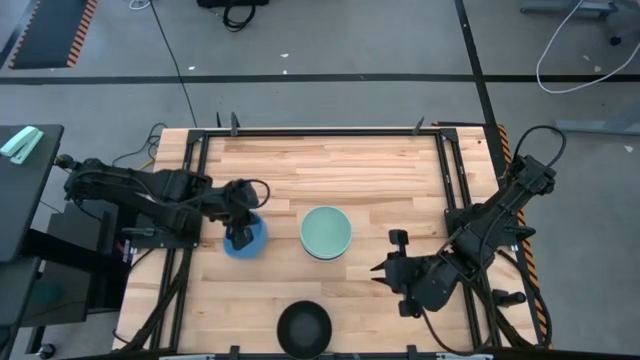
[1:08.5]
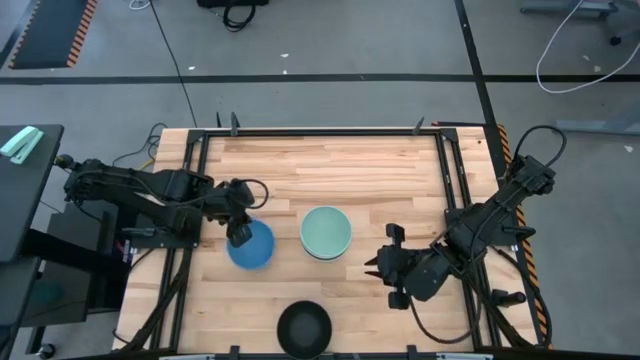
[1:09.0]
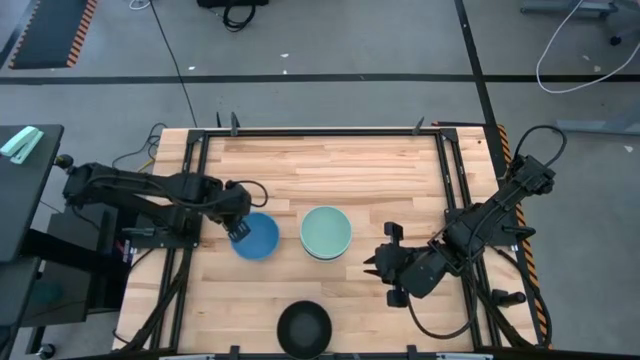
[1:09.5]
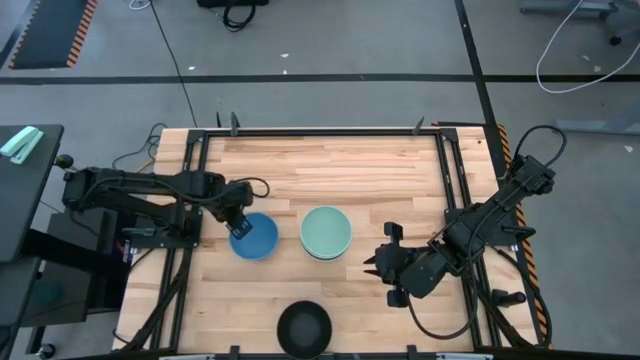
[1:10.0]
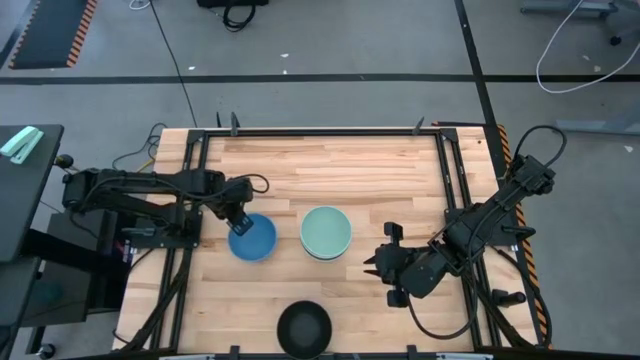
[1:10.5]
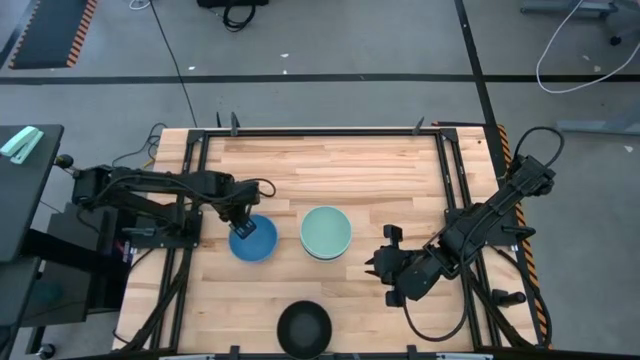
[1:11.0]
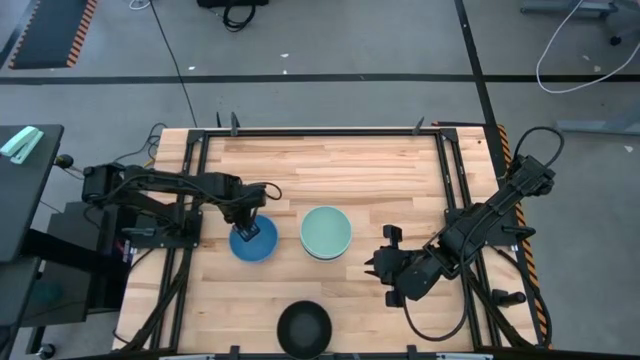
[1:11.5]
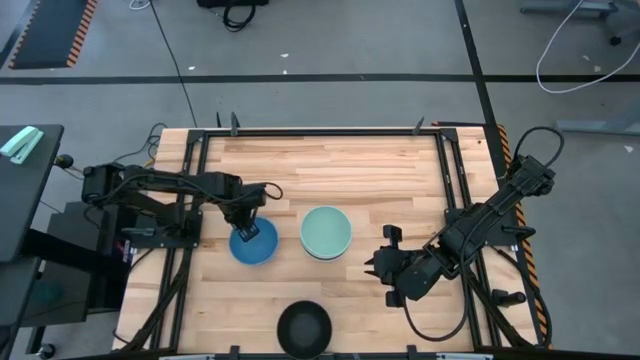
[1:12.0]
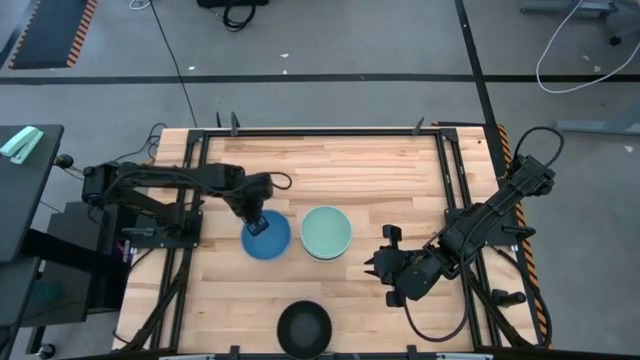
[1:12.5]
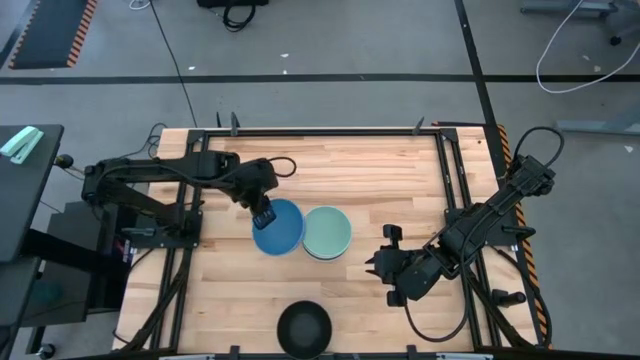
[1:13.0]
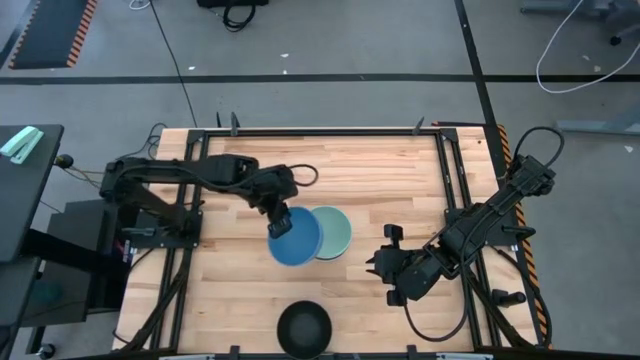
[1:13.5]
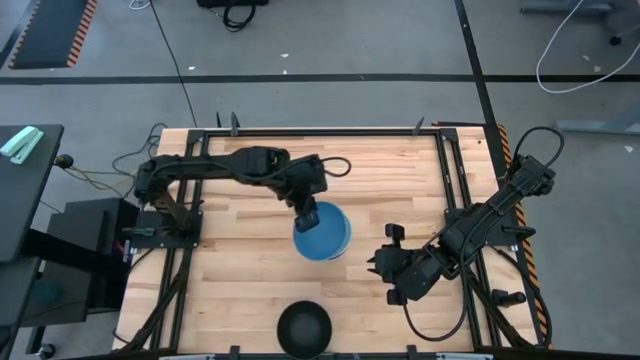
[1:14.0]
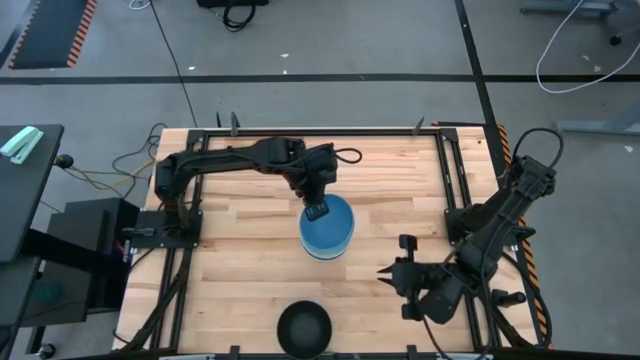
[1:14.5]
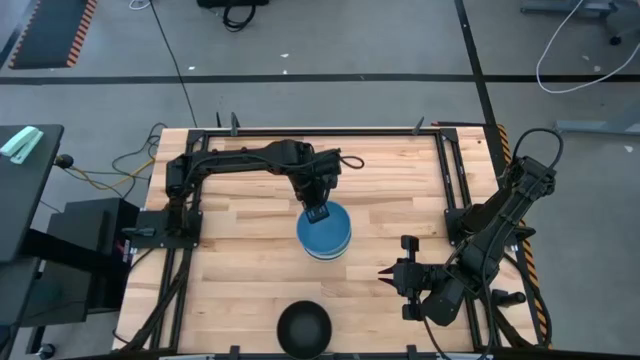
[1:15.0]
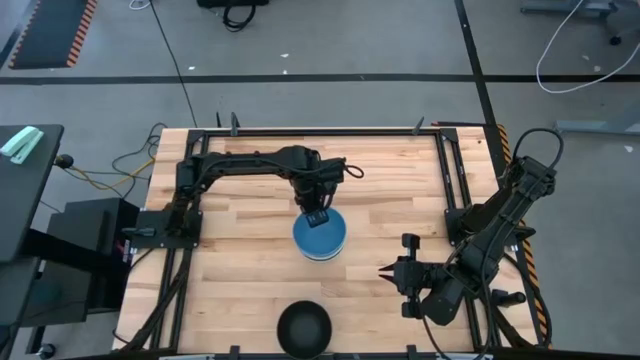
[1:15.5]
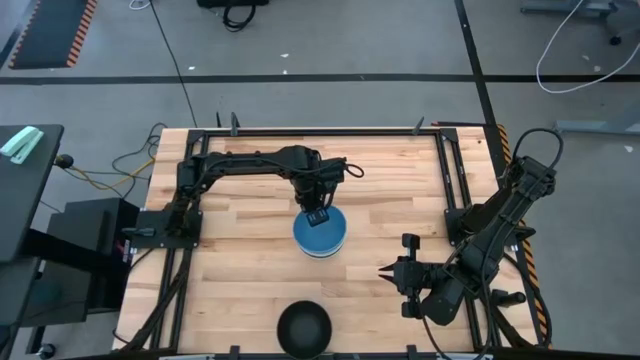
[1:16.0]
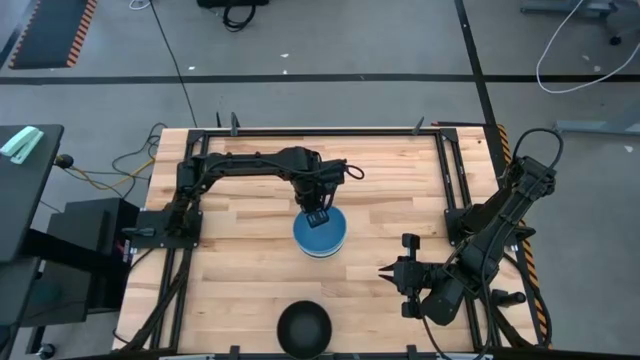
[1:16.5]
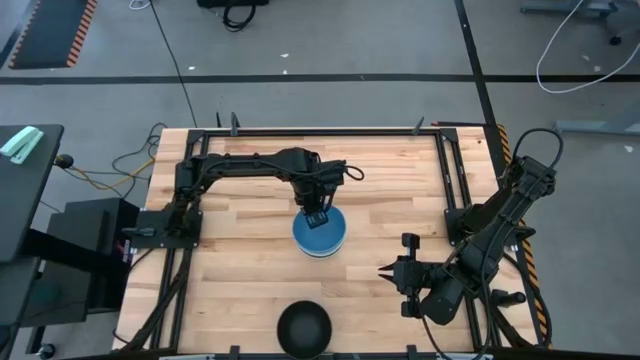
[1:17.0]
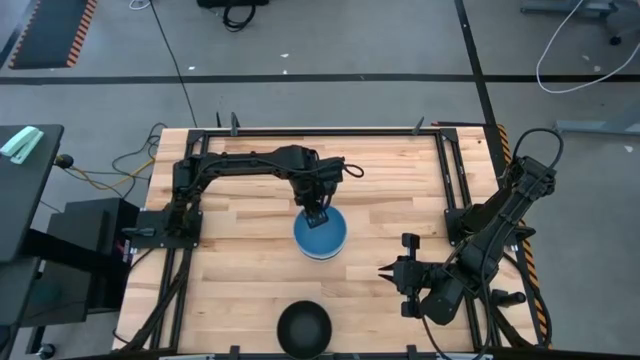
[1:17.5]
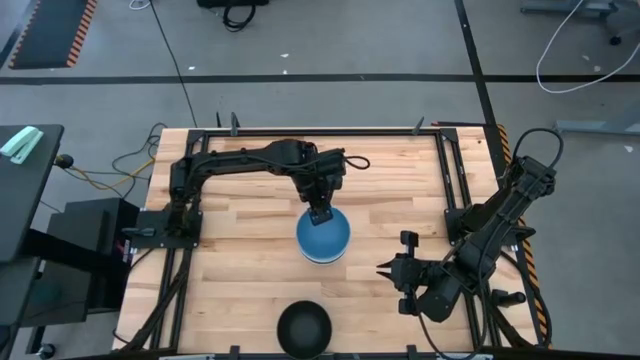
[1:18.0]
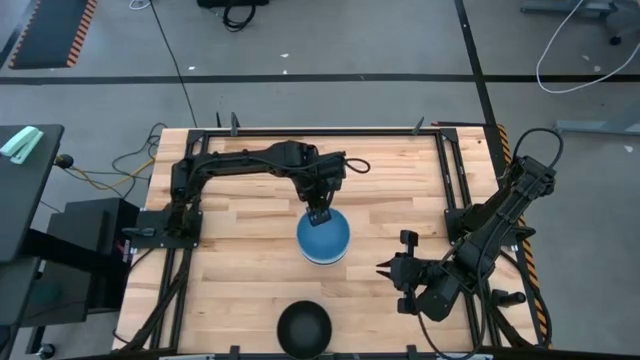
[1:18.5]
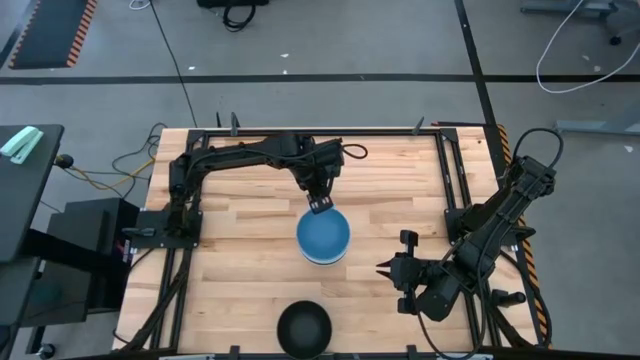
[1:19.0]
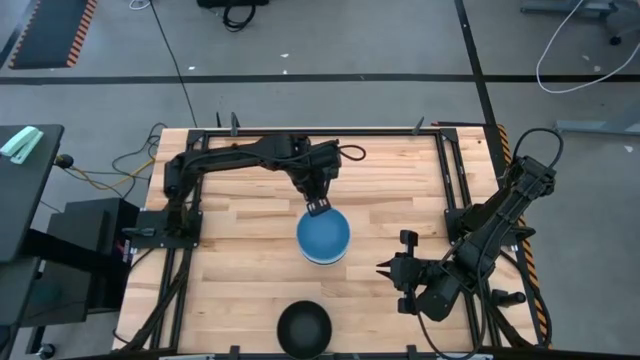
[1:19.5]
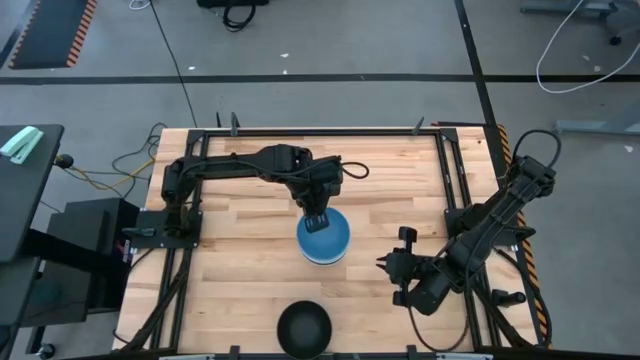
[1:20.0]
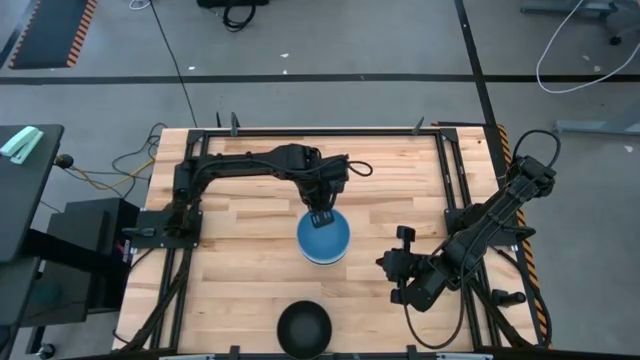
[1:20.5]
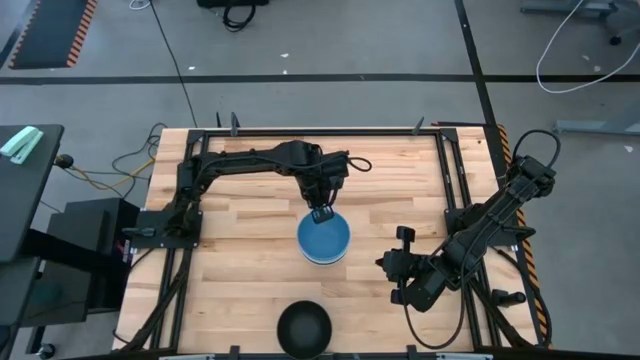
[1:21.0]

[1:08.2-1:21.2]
Task: Nest bowls inside each other
Stack the blue bowl on top of the green bowl

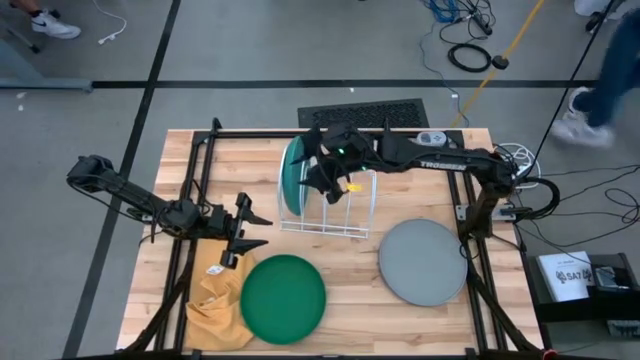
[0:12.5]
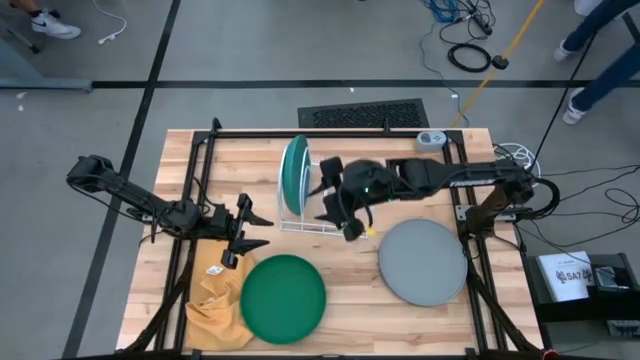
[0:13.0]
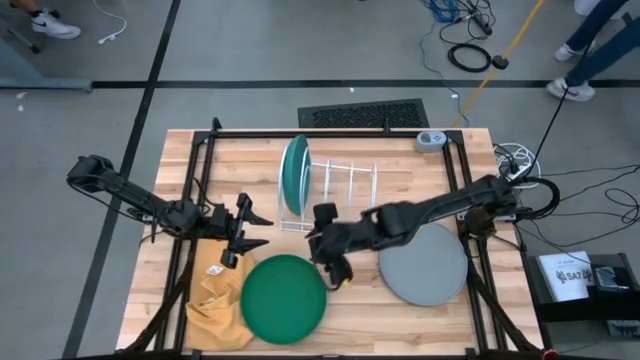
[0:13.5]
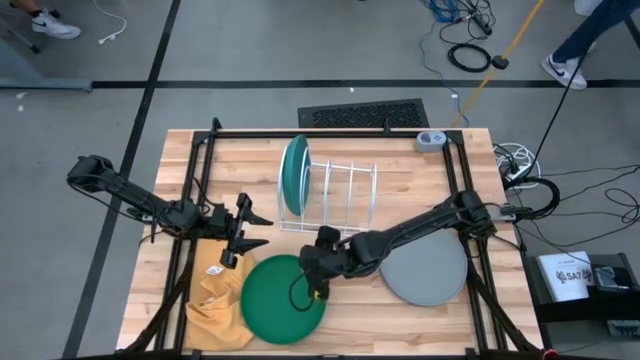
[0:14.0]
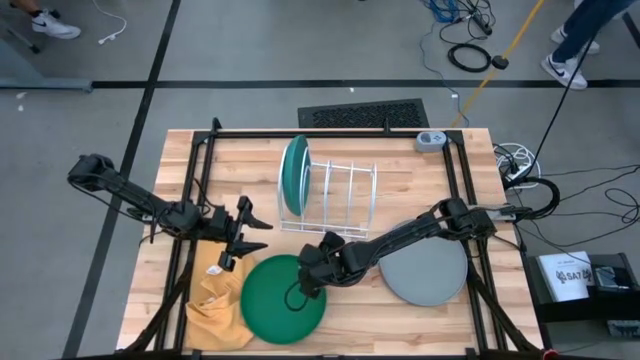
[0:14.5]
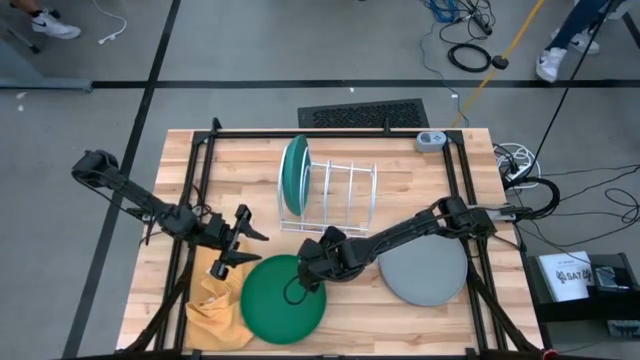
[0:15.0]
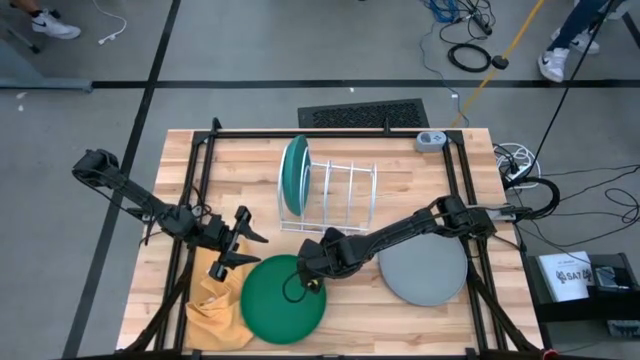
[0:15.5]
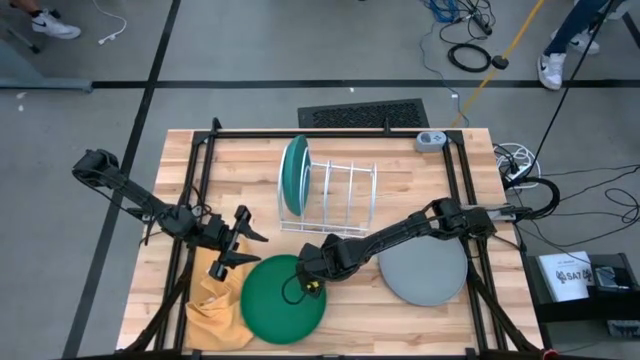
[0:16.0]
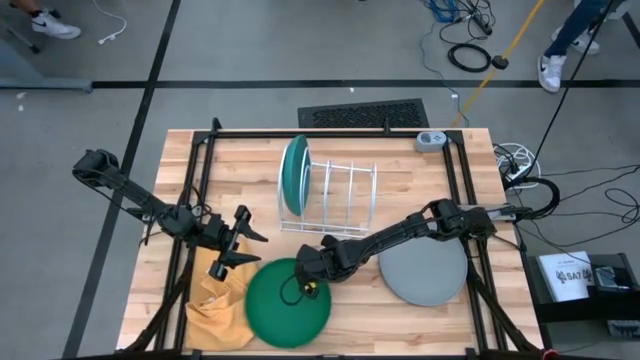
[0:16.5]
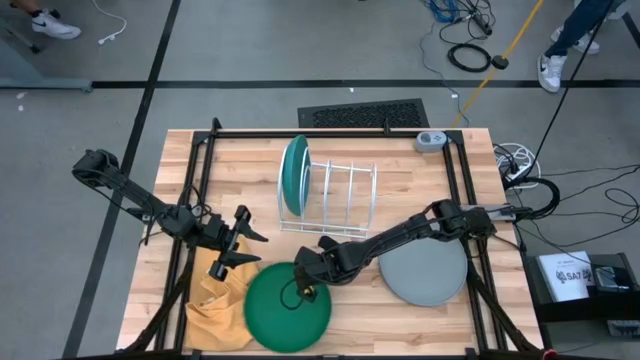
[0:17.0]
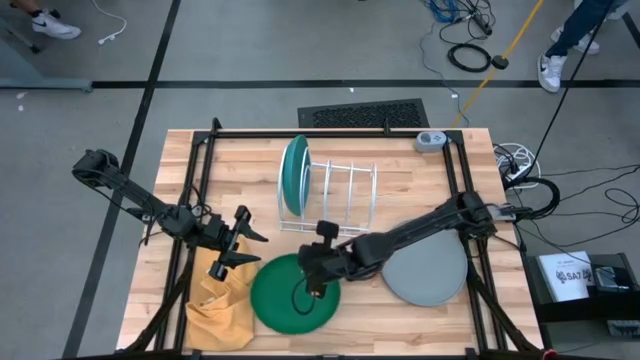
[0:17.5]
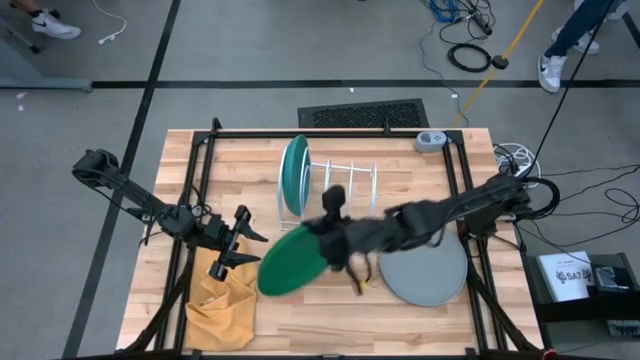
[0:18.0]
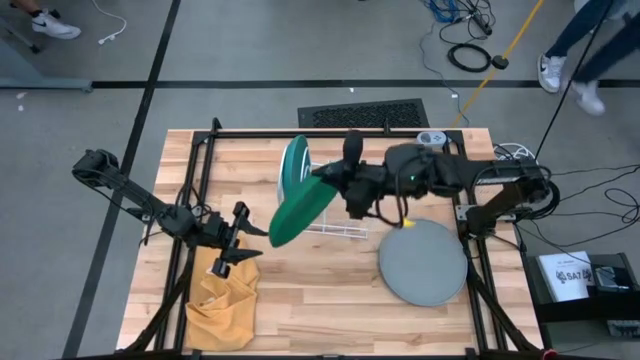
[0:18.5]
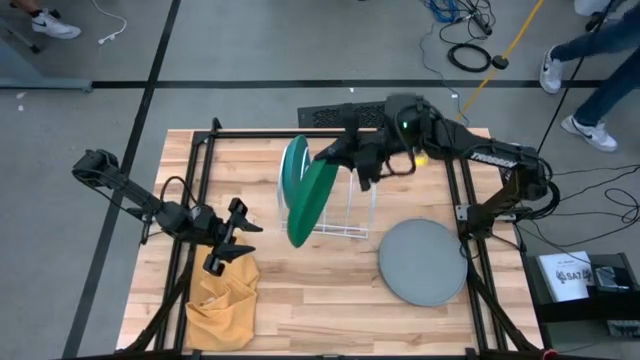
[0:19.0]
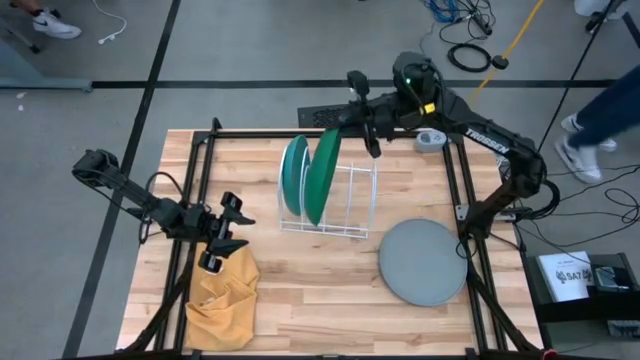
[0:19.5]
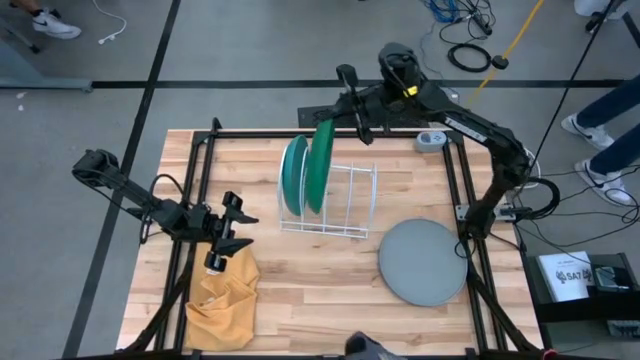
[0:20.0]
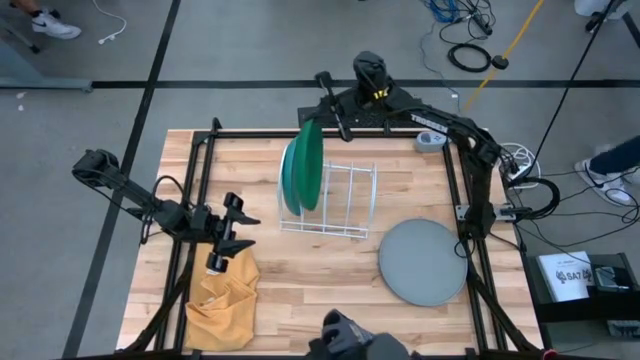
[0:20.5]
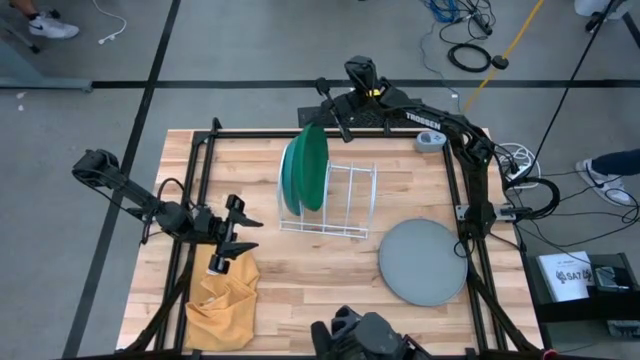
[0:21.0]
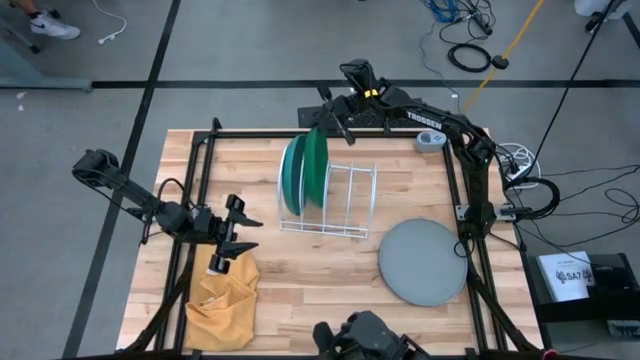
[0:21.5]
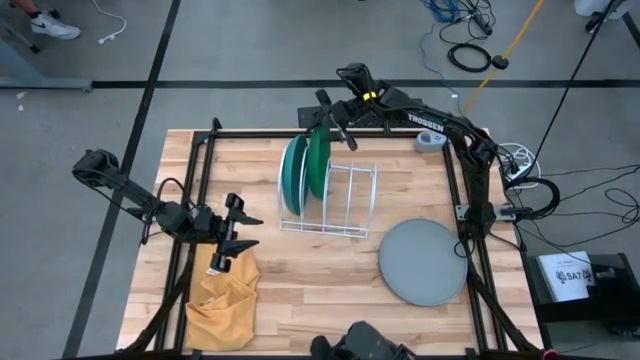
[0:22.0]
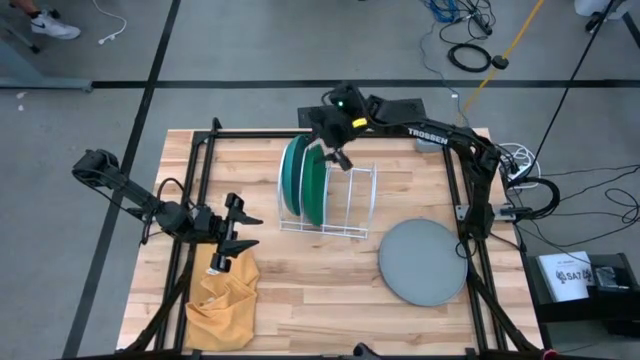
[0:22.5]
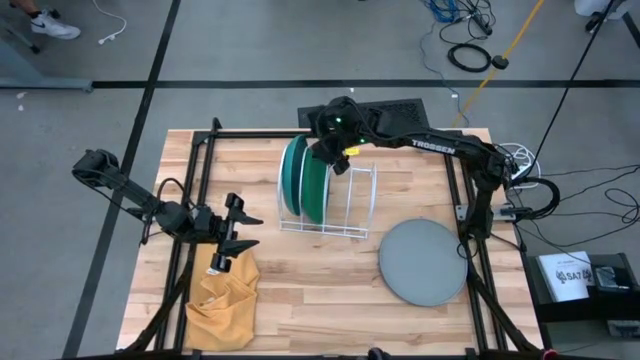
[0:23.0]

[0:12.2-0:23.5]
Task: Sort dishes
Put the green plate in the white dish rack
